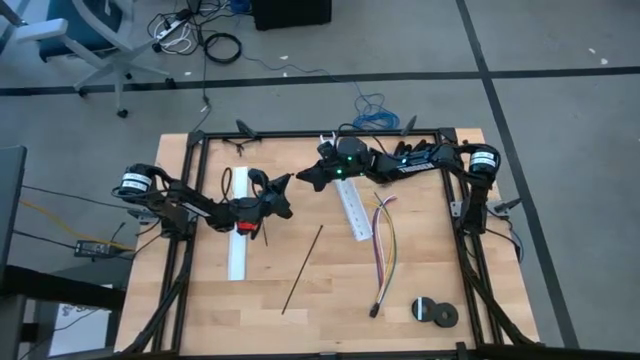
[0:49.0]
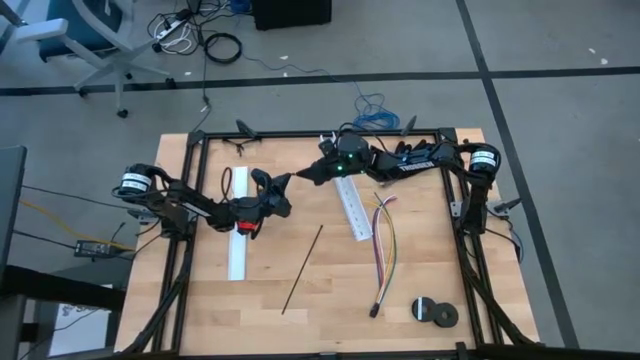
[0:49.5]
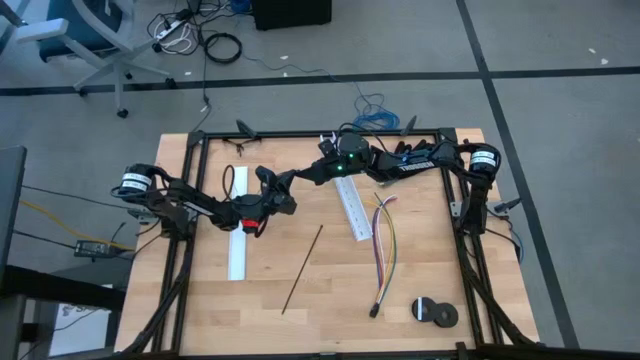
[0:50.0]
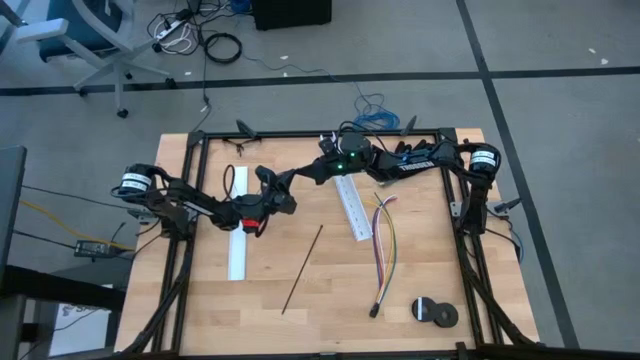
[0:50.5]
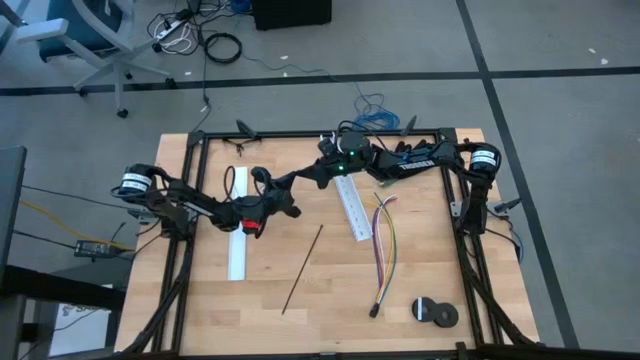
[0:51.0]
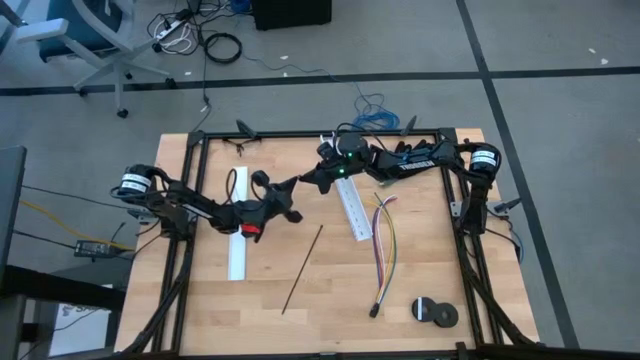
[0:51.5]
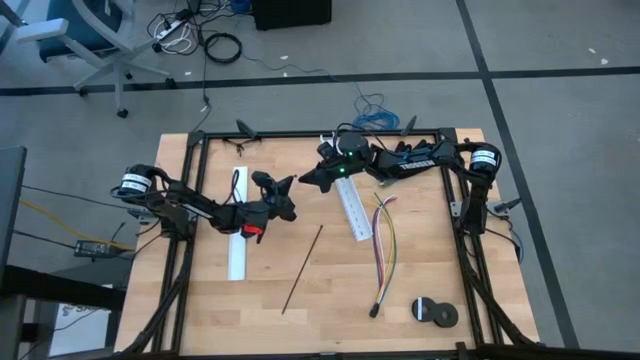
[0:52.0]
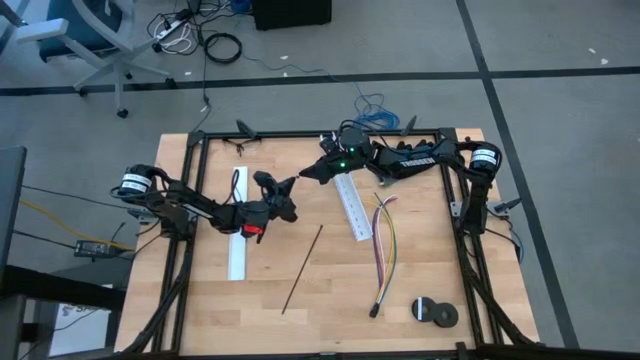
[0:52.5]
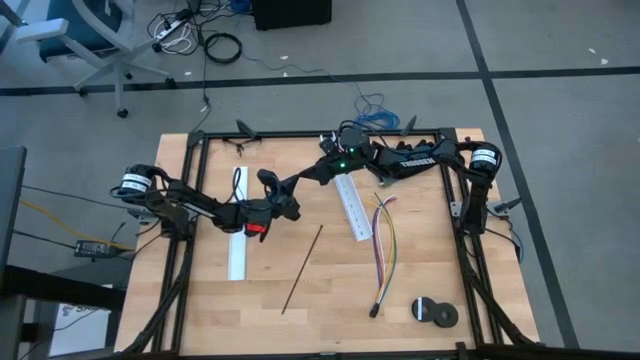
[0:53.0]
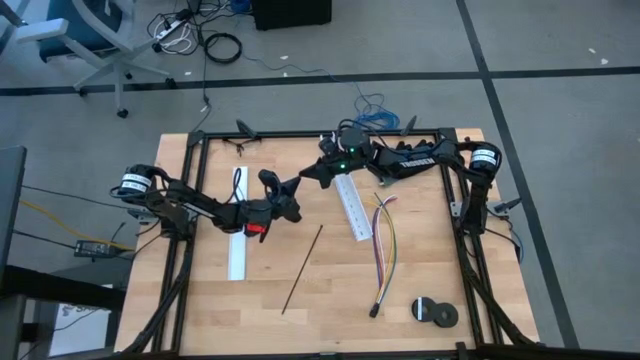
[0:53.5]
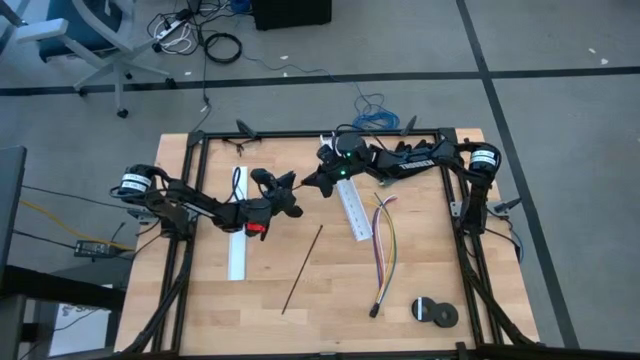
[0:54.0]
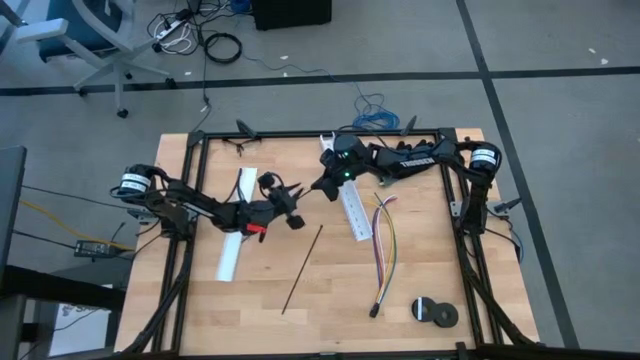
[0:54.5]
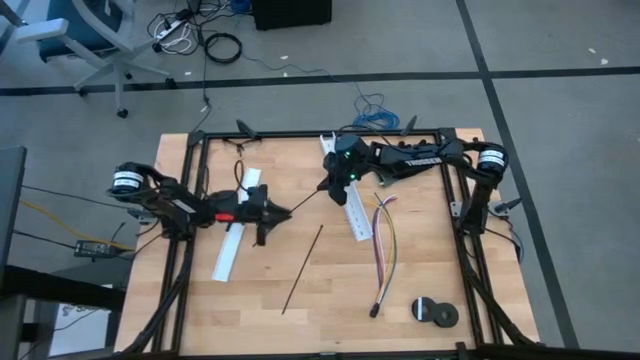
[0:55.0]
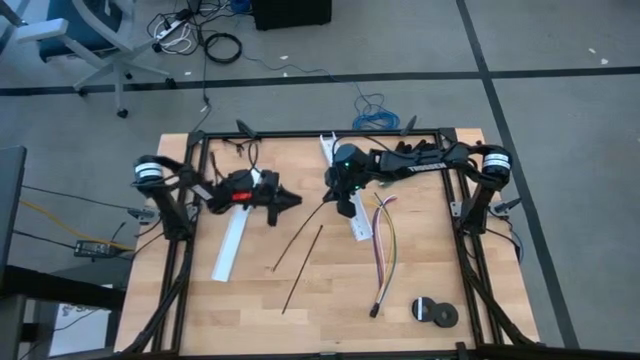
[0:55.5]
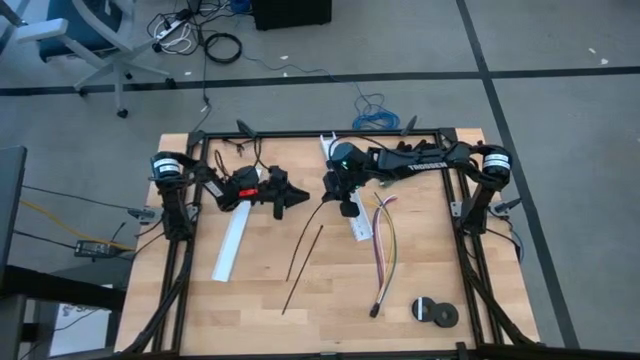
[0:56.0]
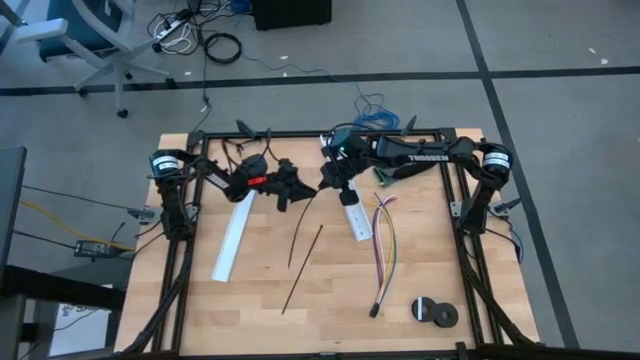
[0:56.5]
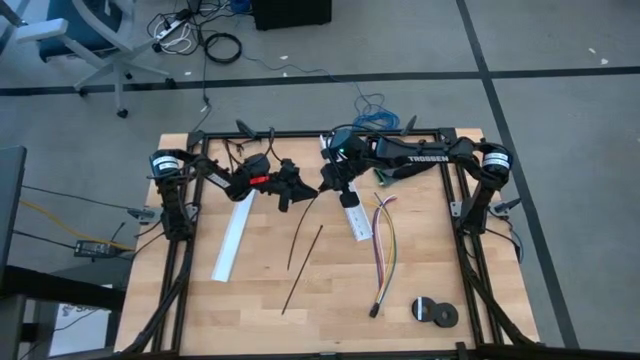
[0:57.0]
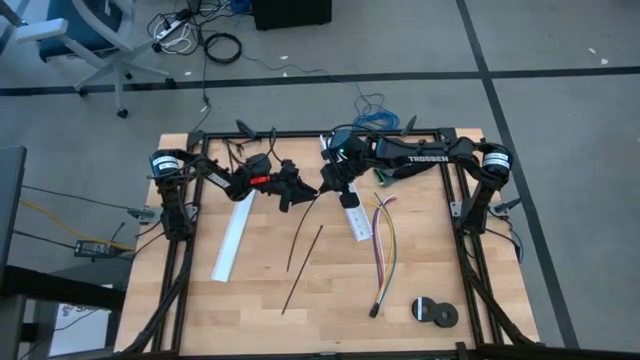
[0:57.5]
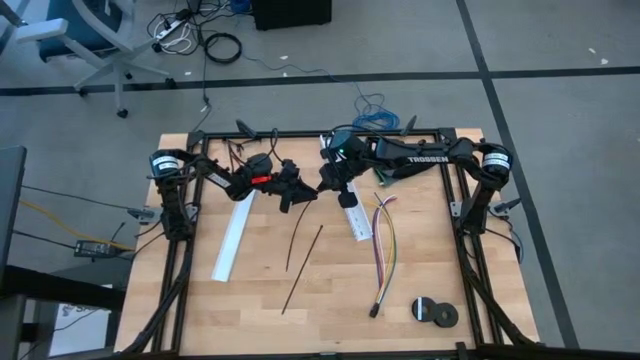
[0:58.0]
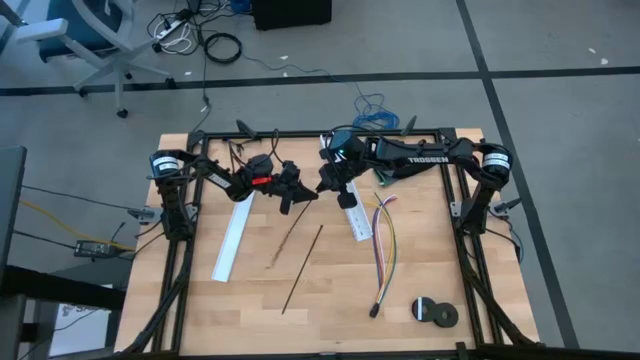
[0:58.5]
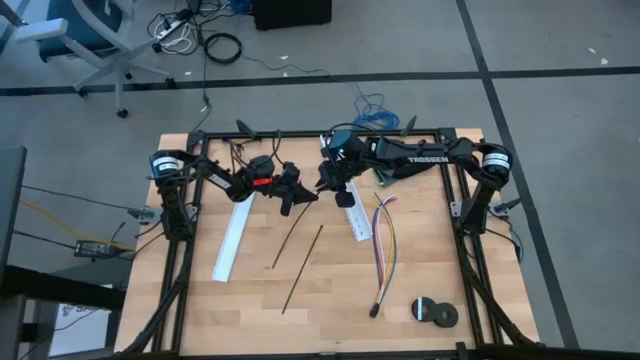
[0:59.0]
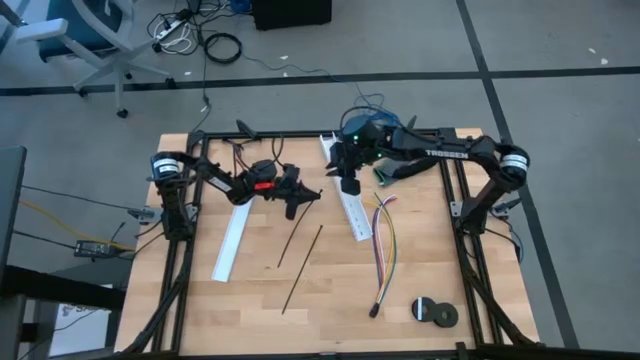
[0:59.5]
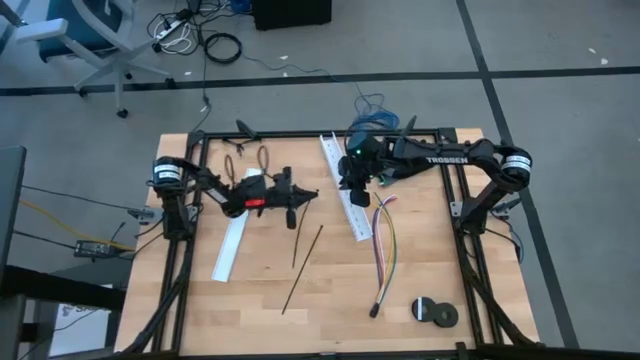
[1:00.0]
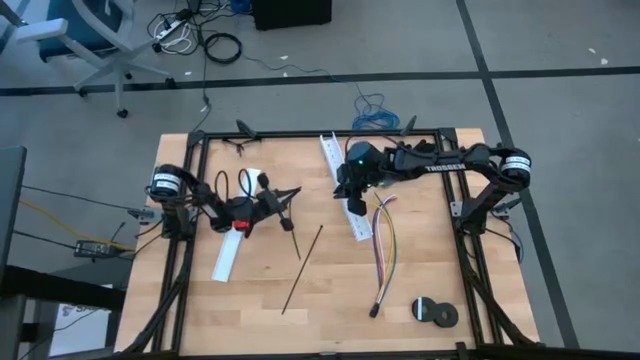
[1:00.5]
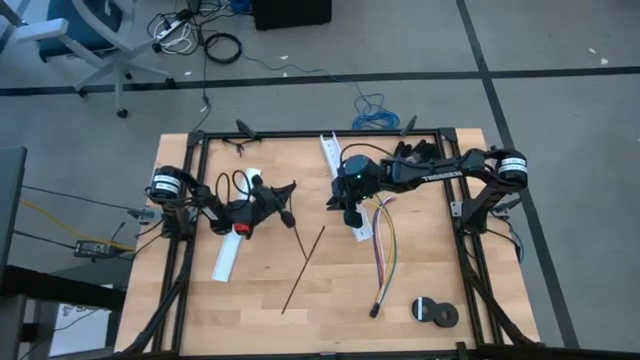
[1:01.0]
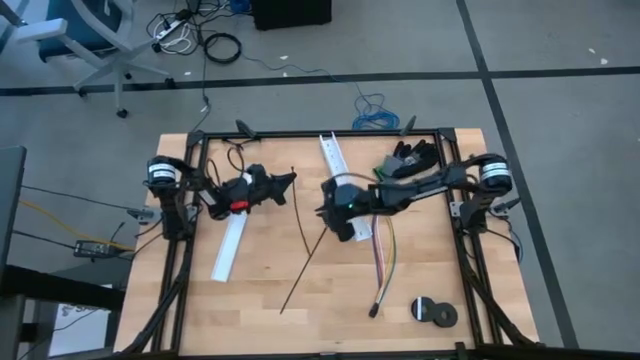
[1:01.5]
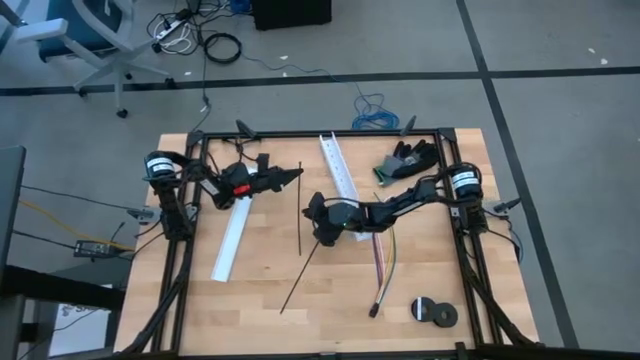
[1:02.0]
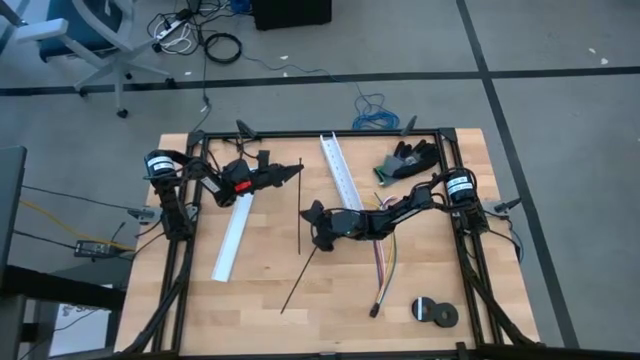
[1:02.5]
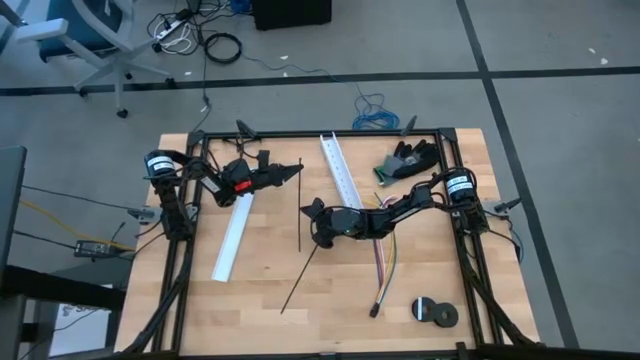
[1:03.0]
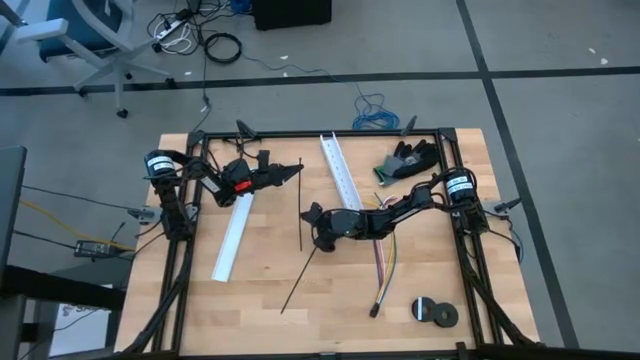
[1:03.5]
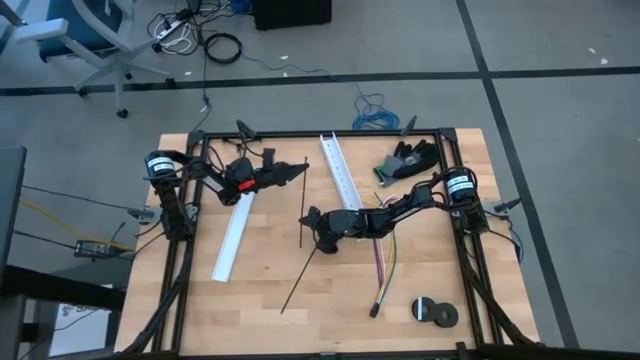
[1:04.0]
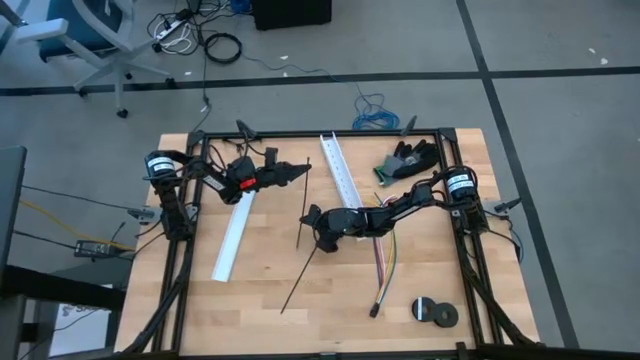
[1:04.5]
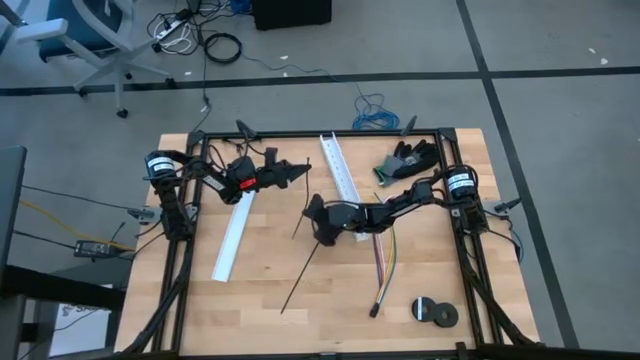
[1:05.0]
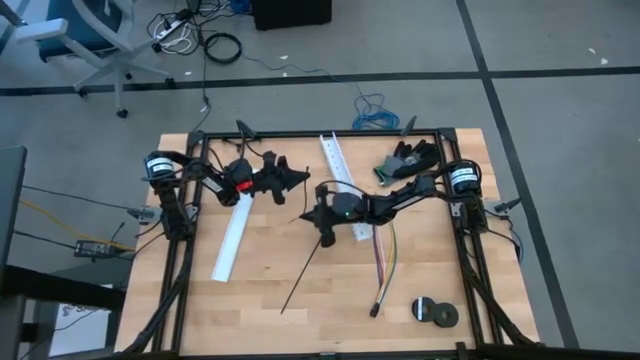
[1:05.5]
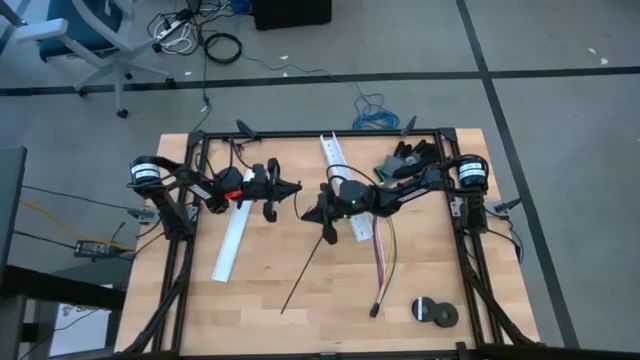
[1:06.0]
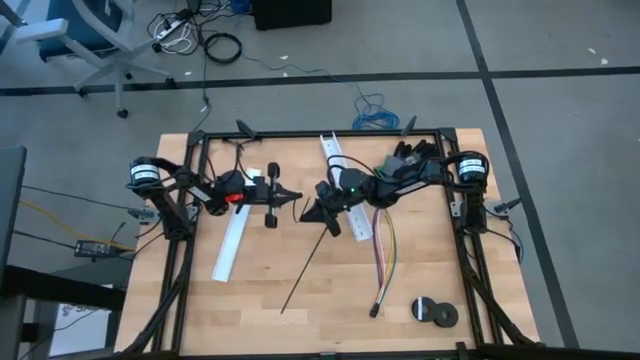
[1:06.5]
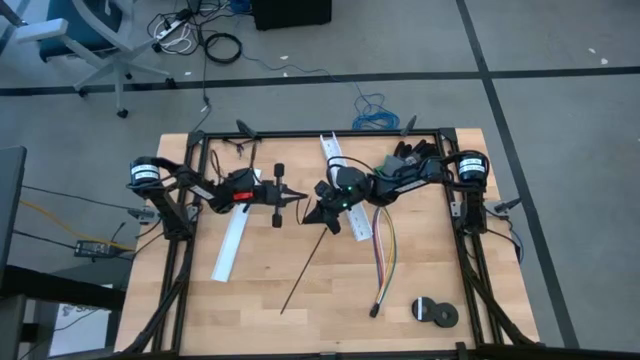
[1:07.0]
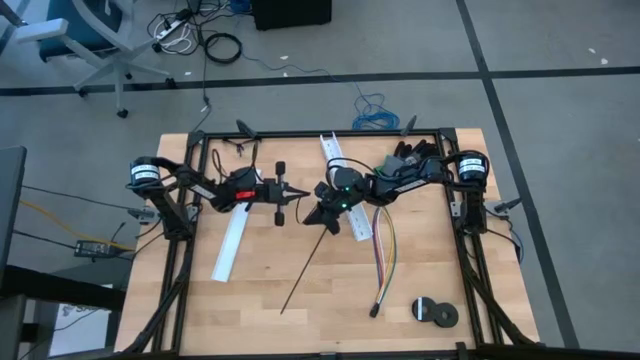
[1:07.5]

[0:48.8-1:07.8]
Task: Ziptie cables
Prepare the black zip tie

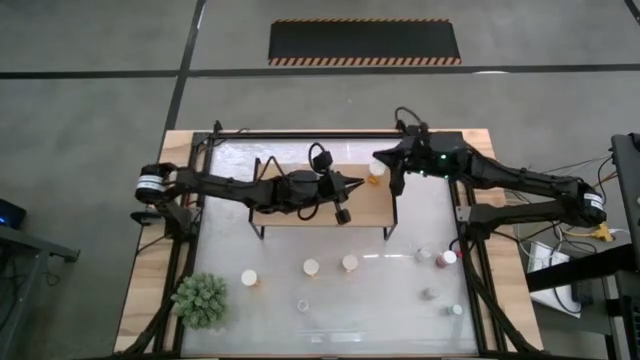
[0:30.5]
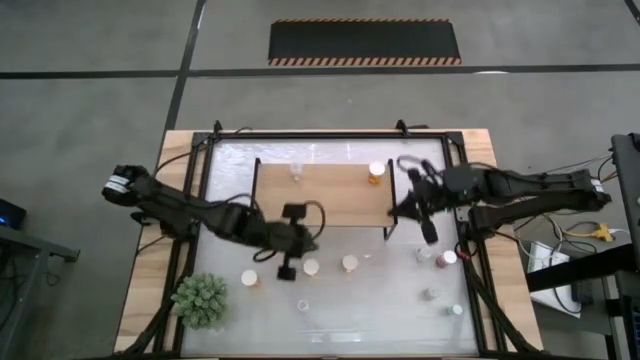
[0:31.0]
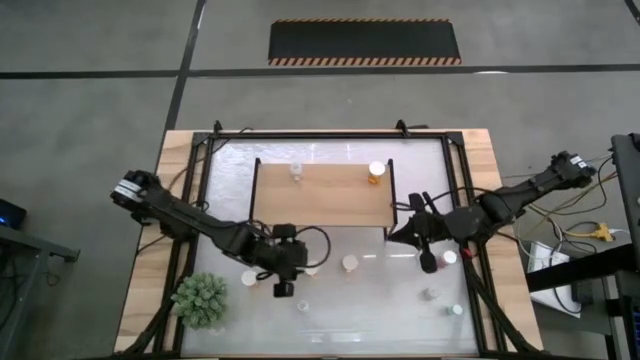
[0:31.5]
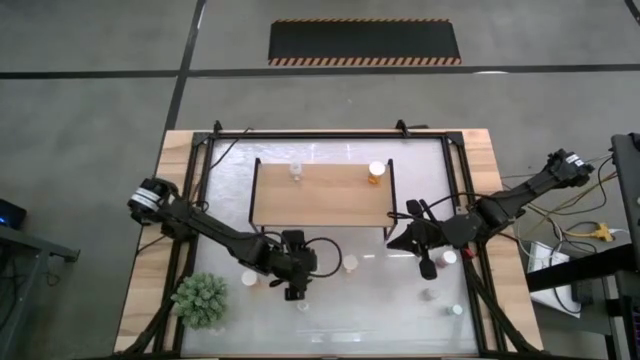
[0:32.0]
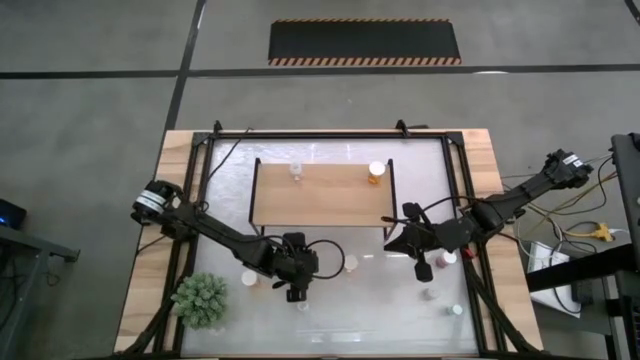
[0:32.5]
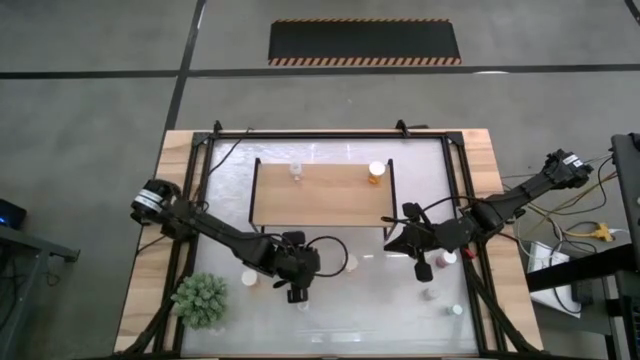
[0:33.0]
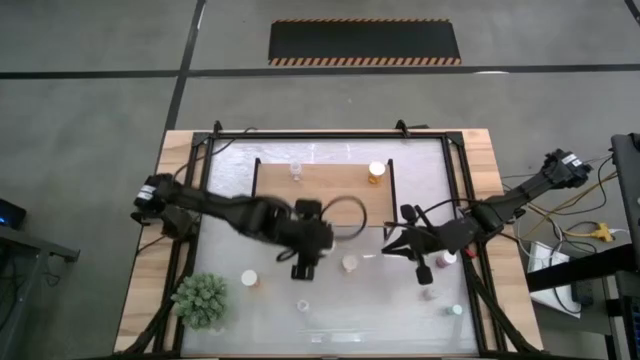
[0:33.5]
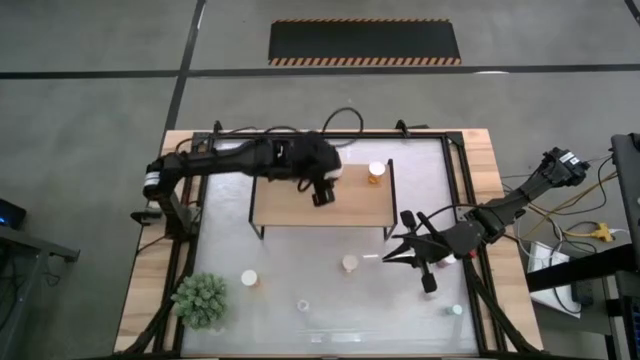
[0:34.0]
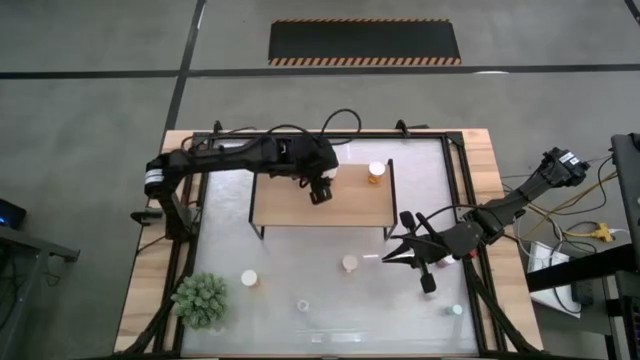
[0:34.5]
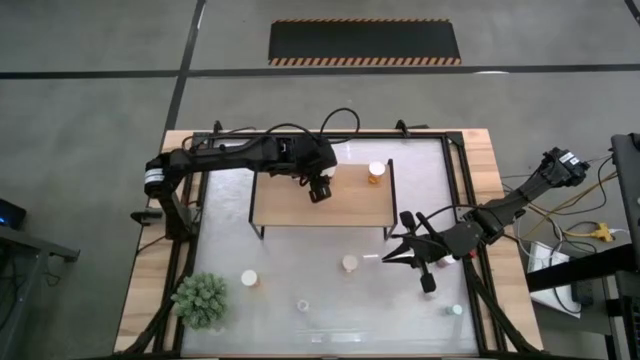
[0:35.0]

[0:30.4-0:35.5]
Task: Pick and place medicine bottles onto shelf by color
Put the orange pill bottle on the shelf
